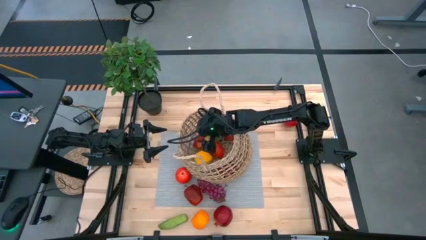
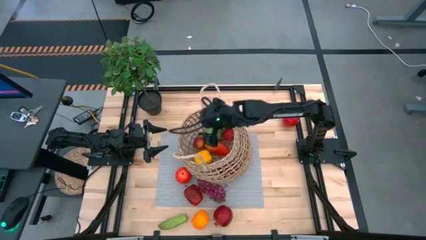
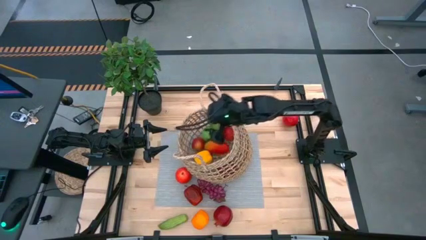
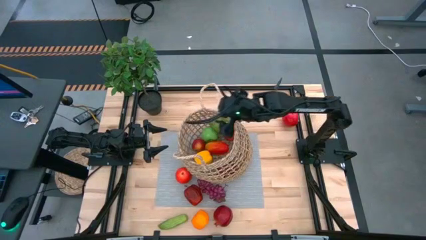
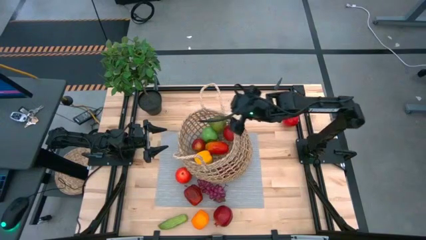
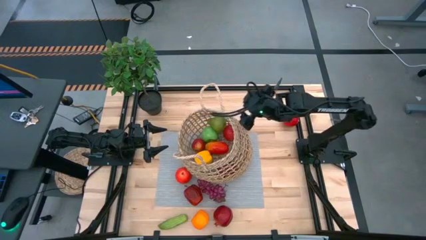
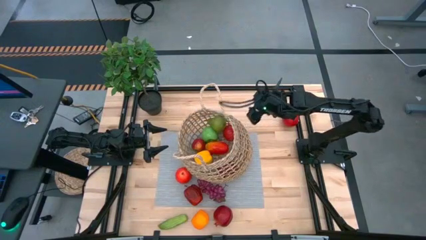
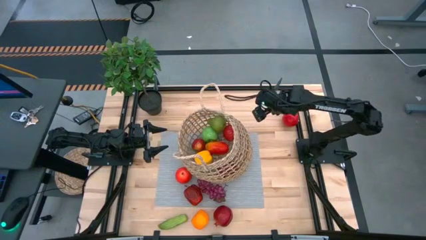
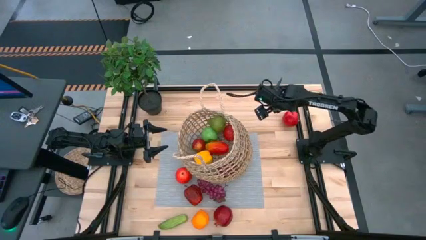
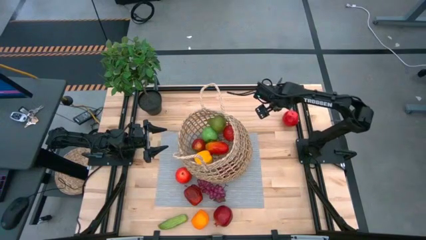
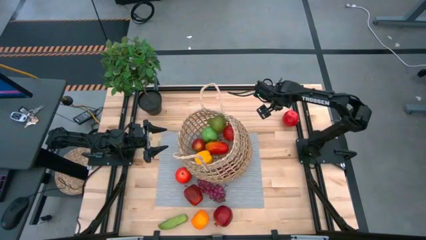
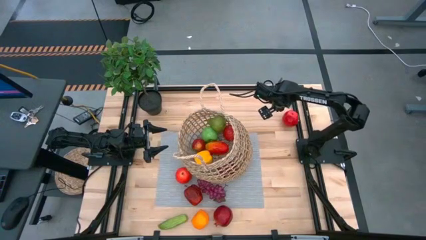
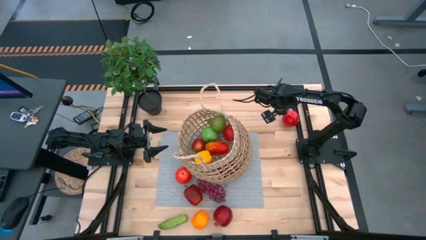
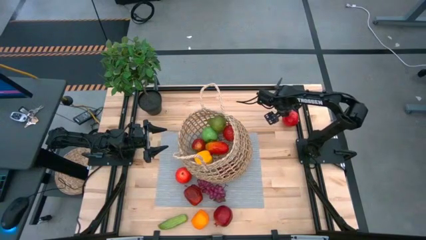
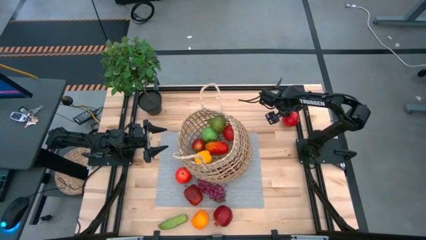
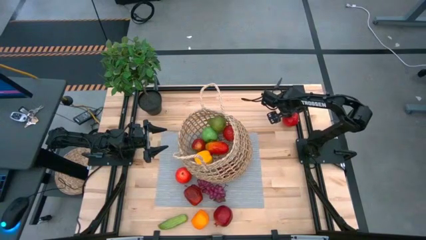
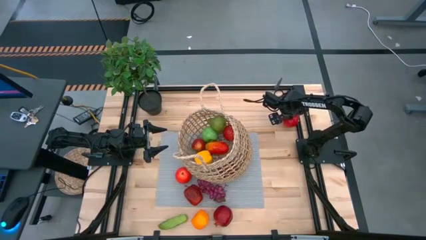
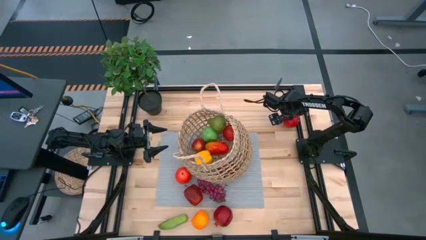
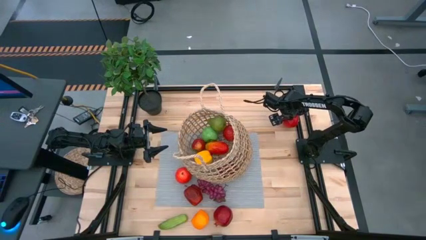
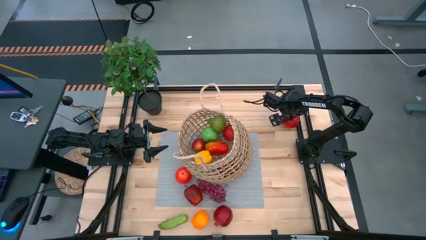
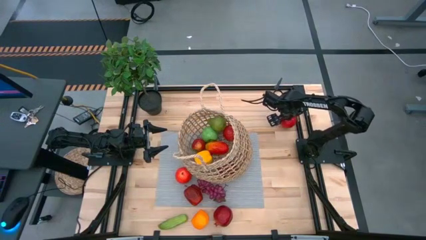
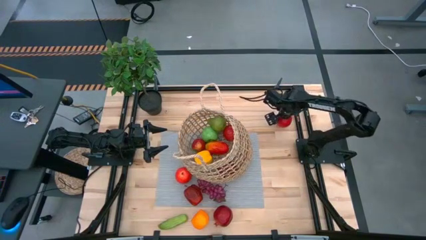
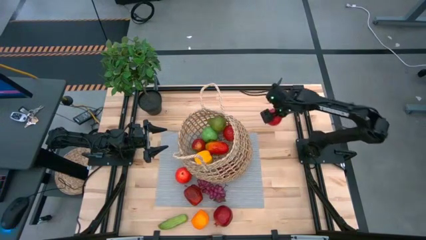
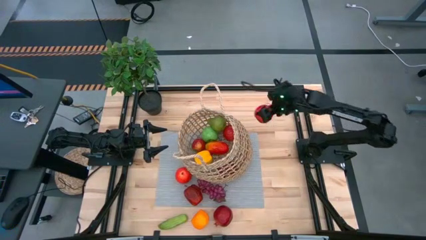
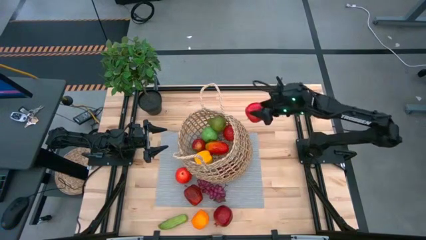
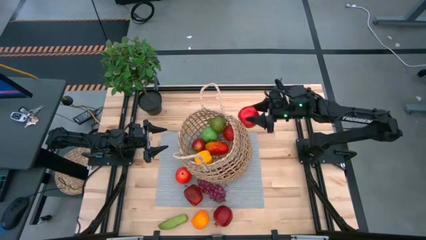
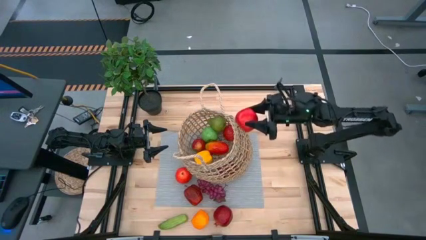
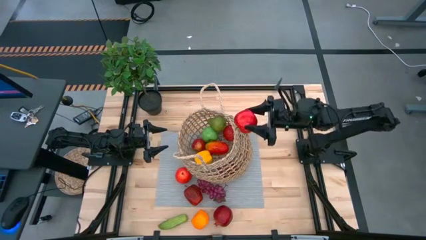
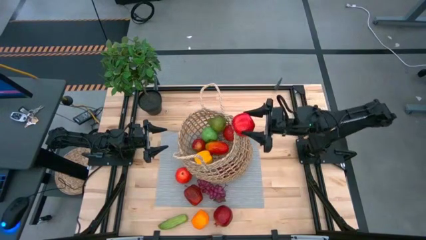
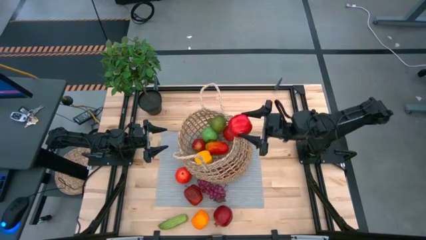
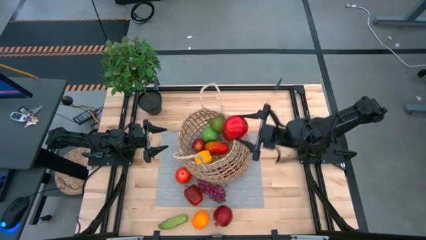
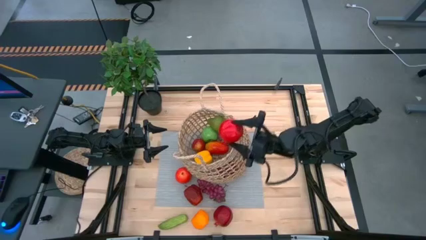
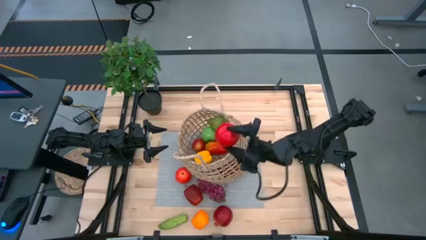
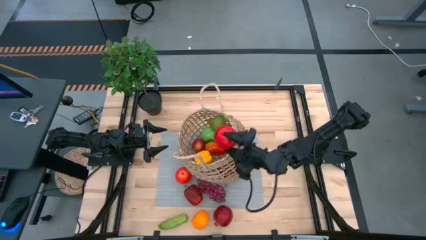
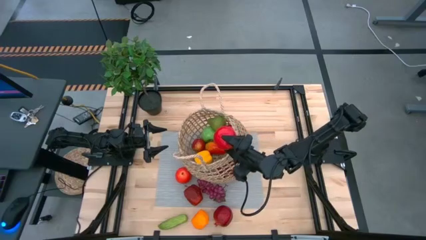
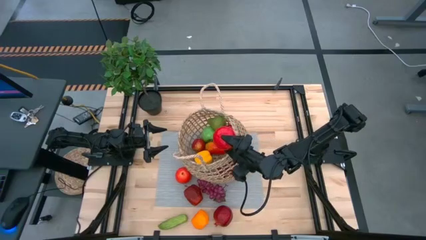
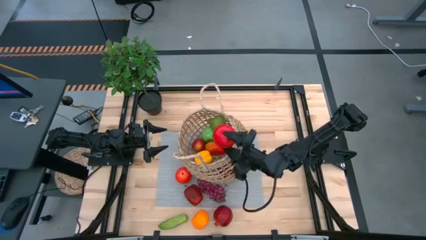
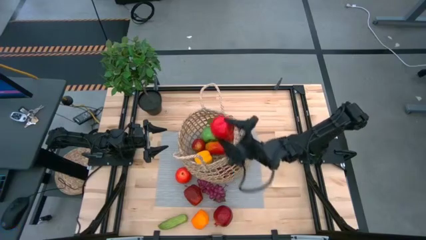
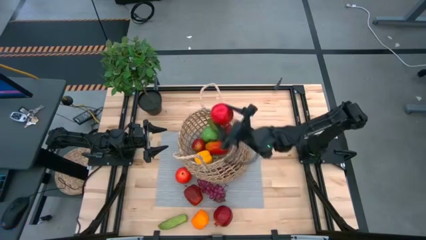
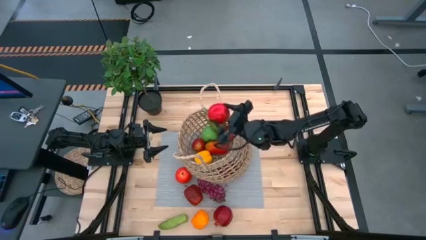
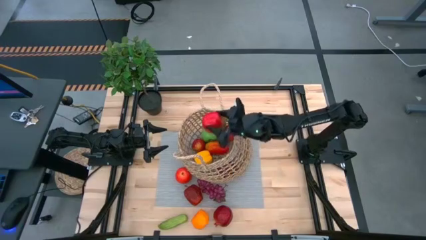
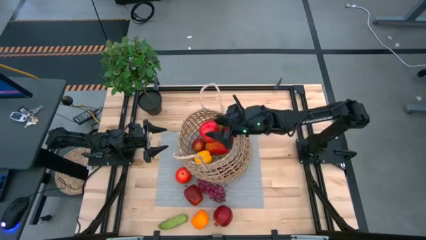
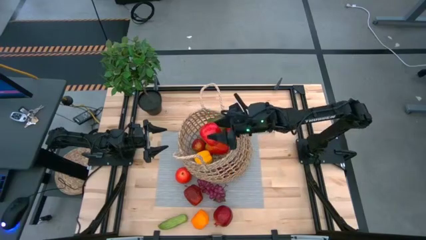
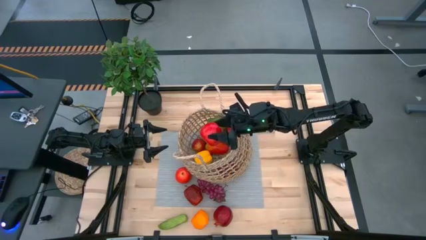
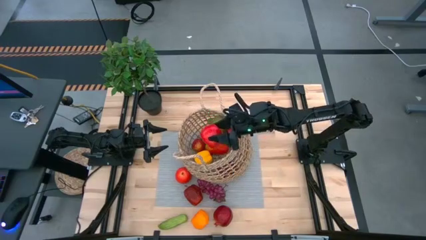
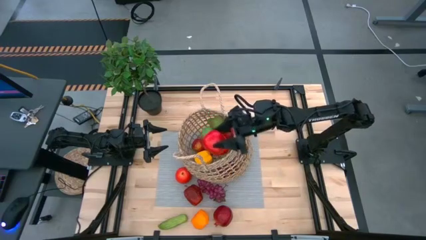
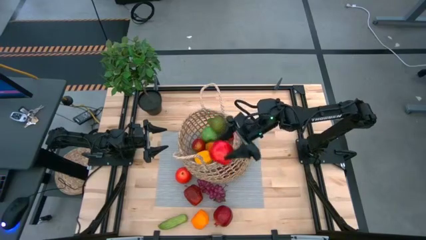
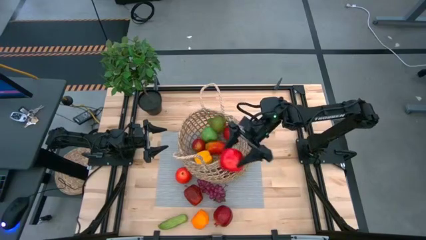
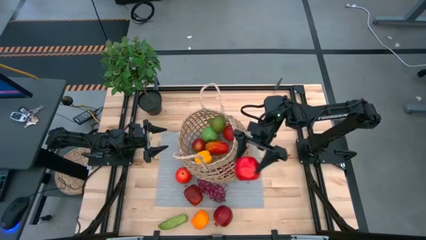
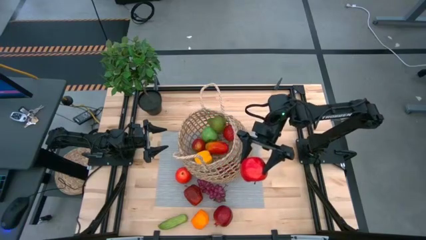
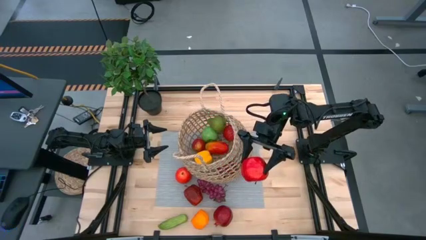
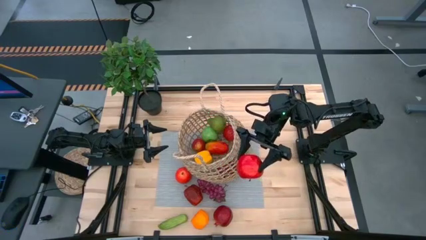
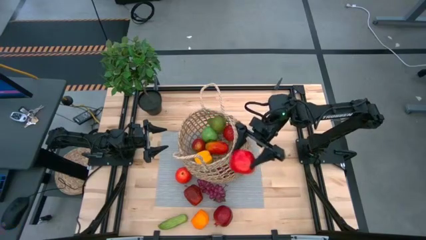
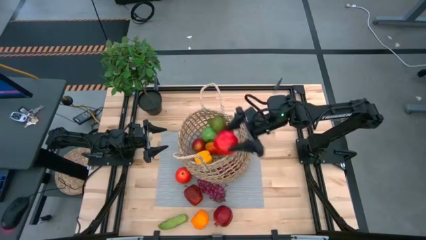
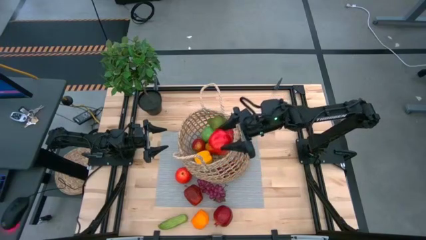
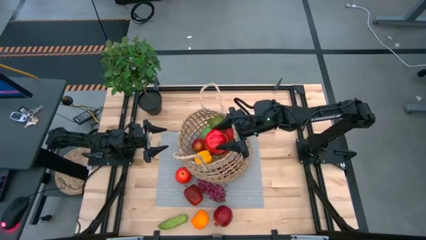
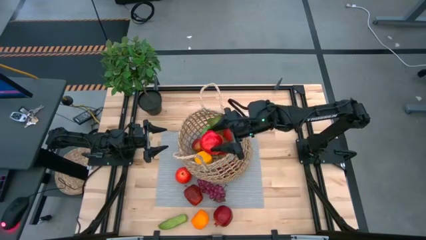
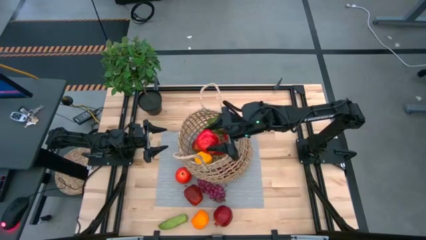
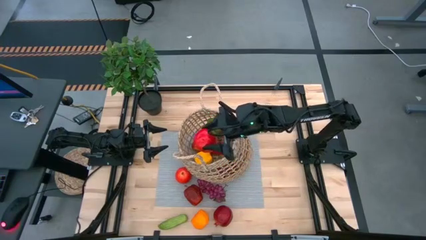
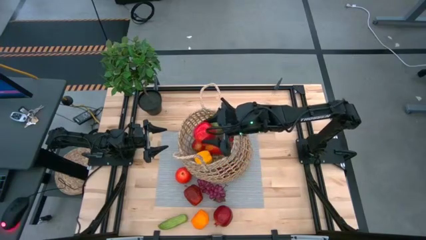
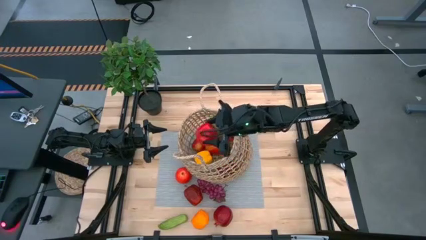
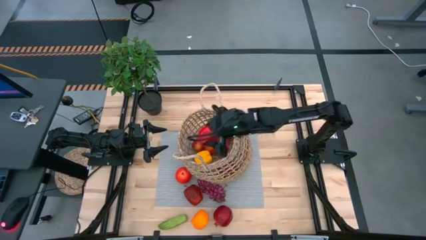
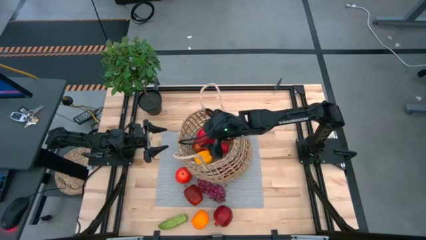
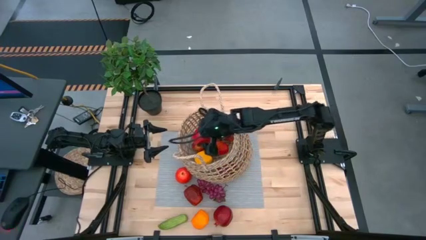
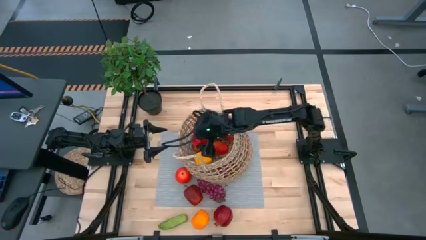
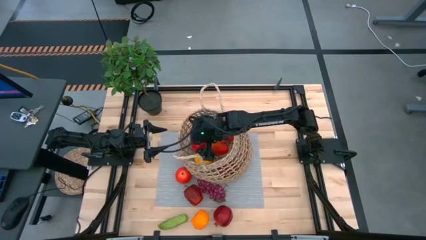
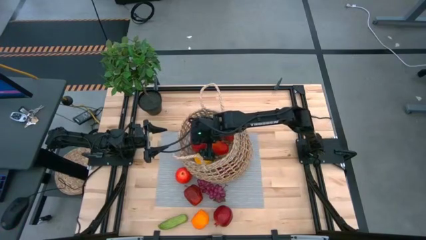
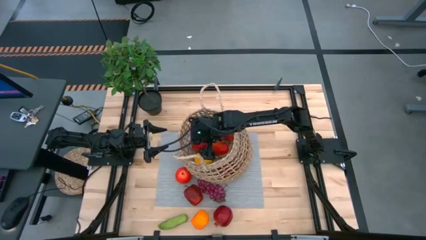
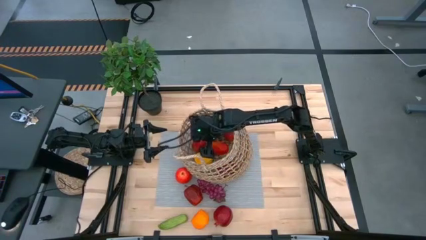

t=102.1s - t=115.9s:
Task: Build produce basket
Put the red apple into the basket

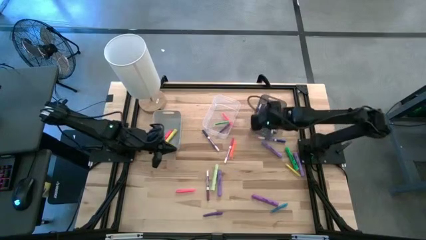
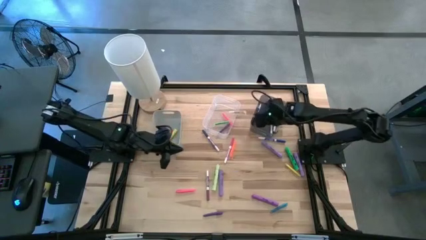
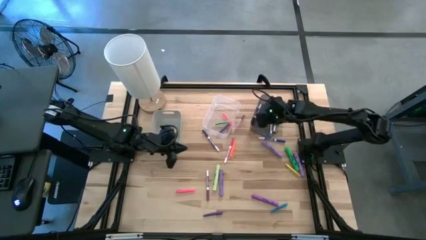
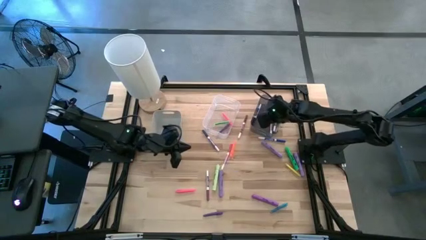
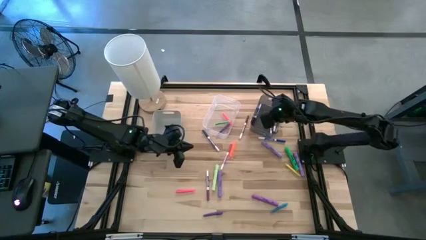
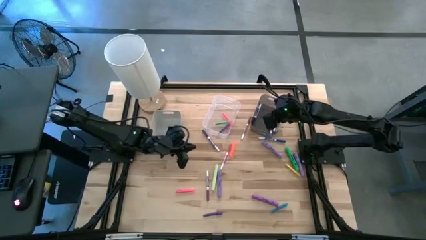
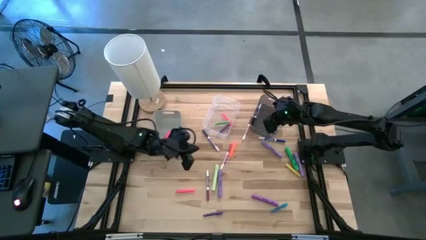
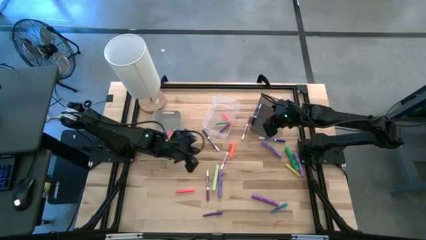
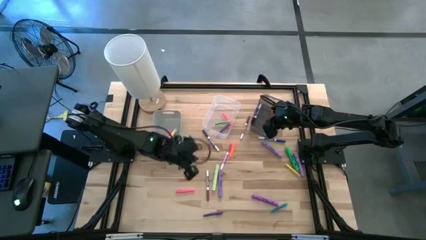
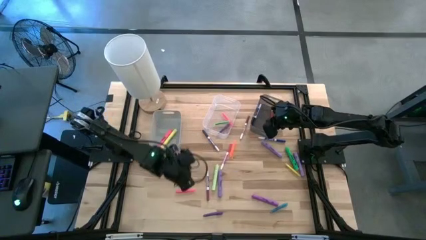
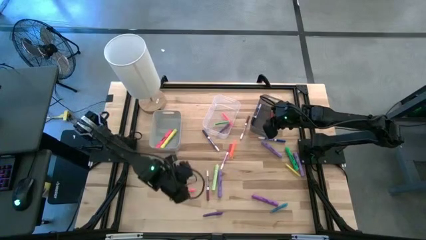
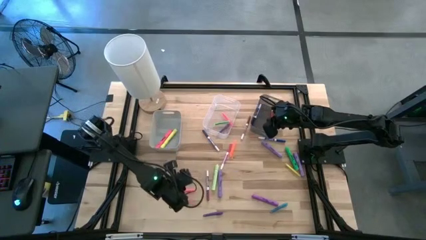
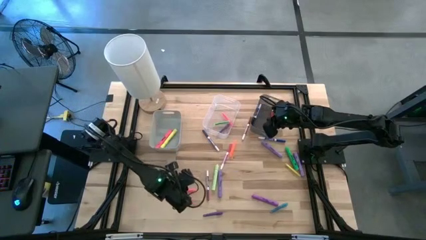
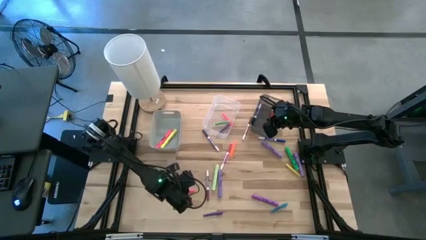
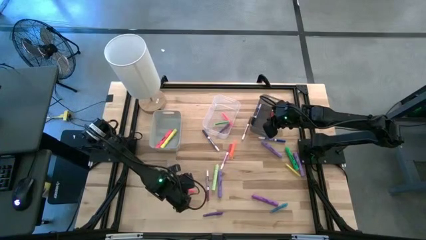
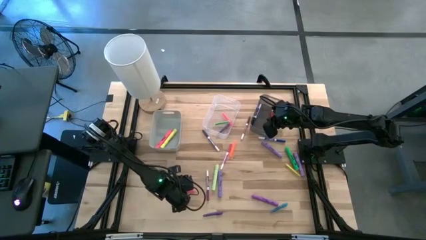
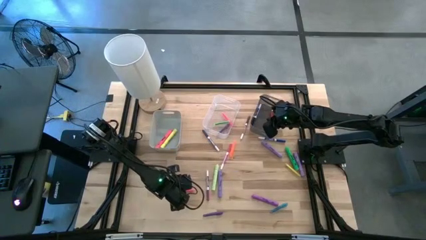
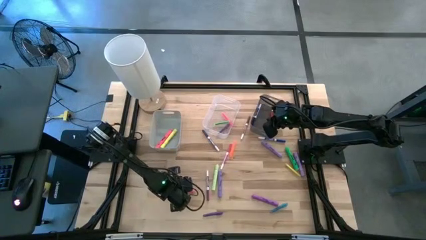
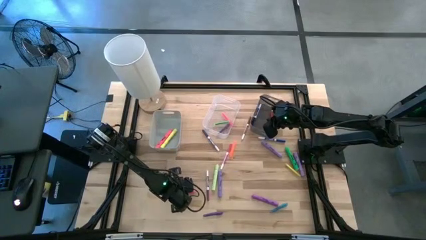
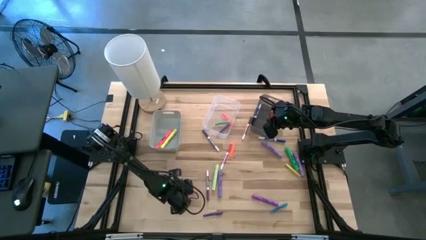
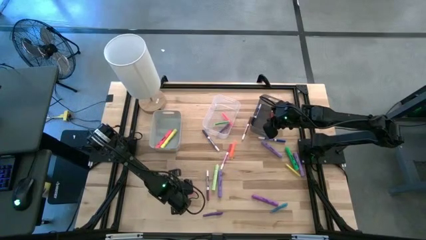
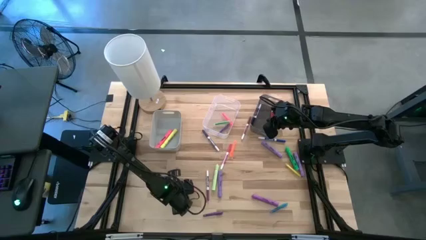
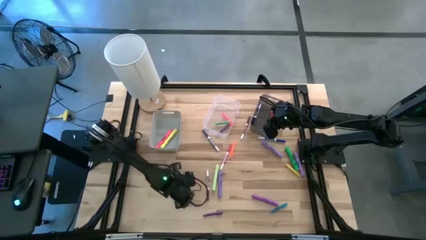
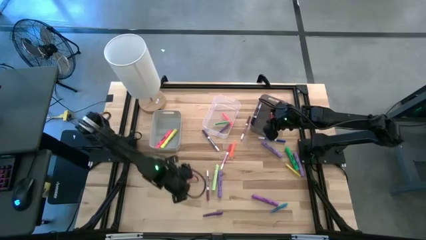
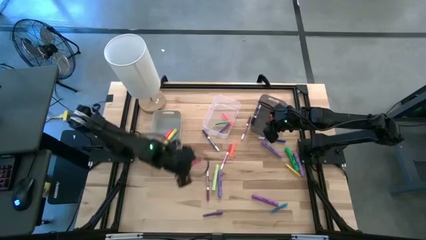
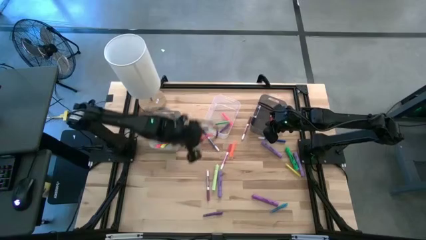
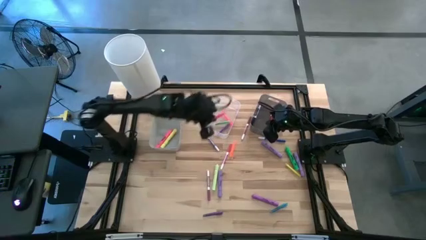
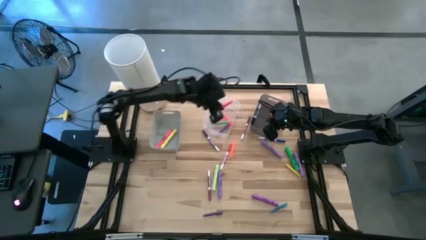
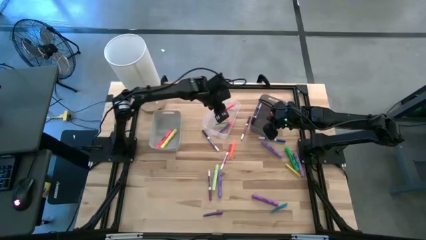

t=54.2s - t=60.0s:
Task: Pick & Place Markers
Put the pink pen into the transparent bin
